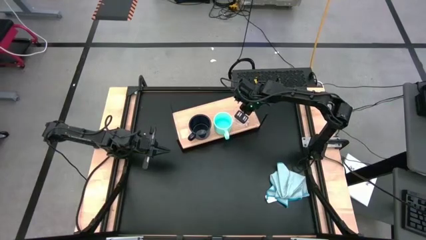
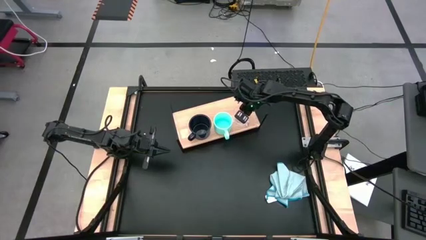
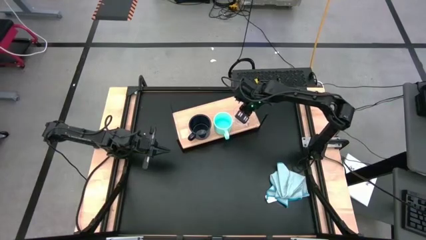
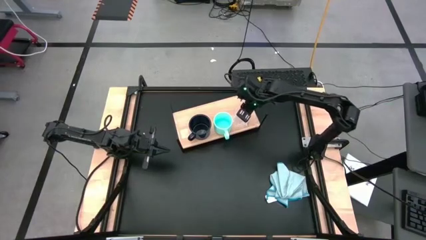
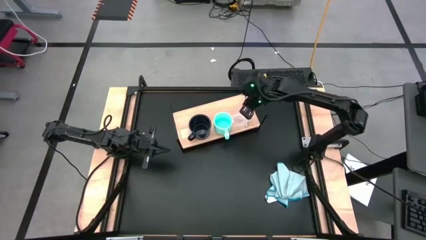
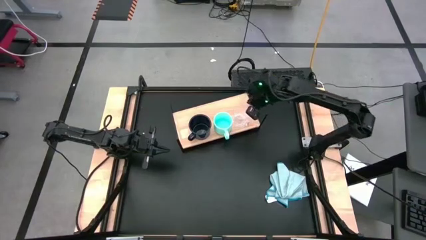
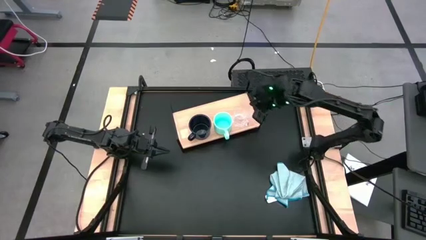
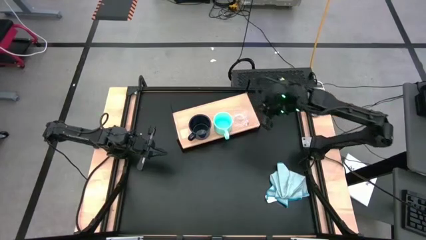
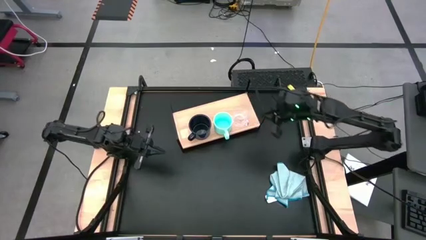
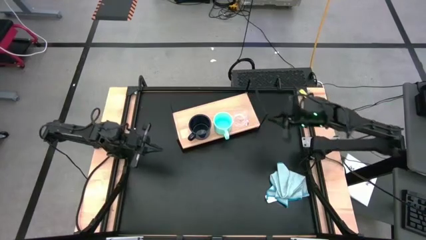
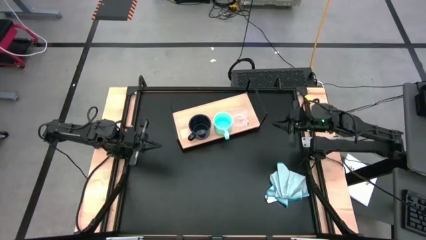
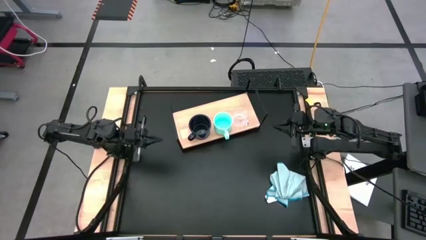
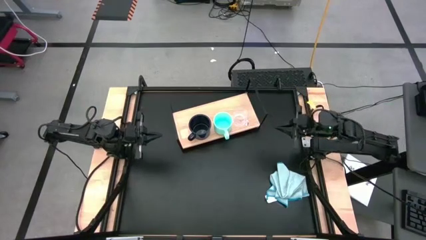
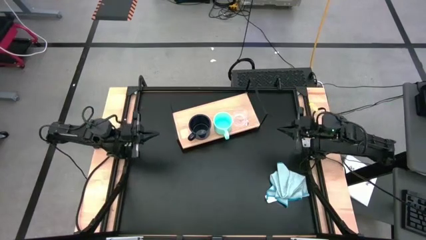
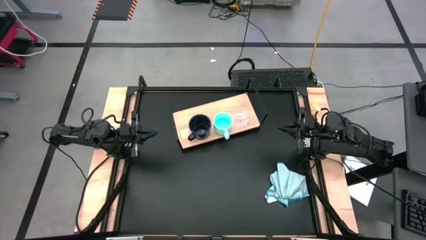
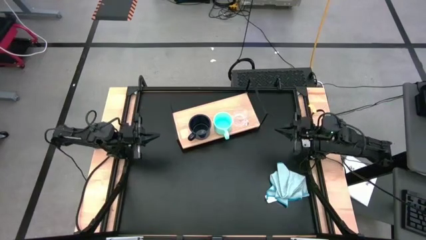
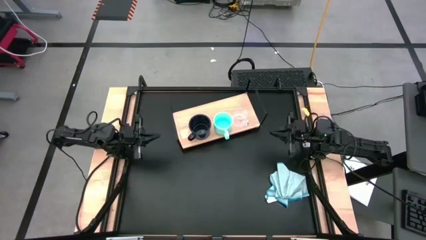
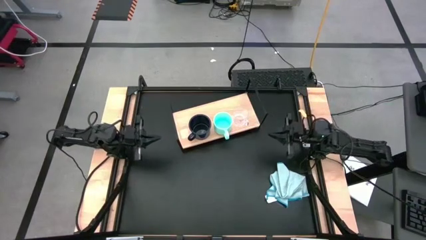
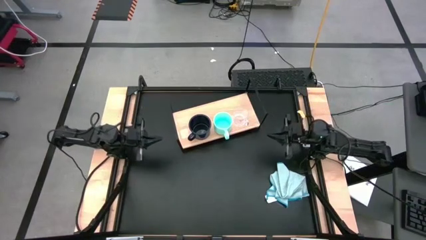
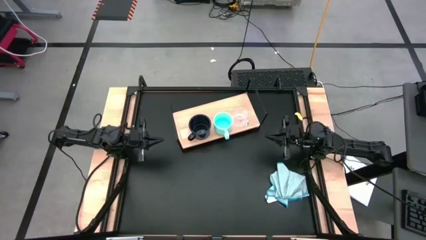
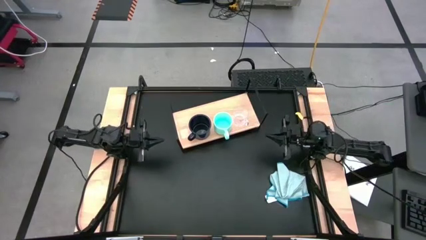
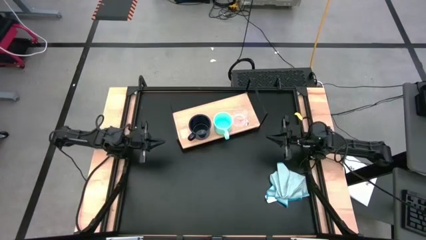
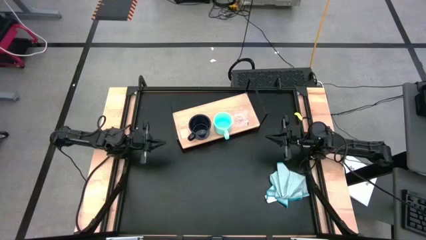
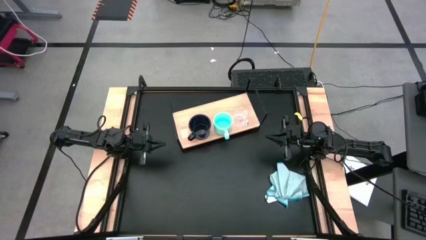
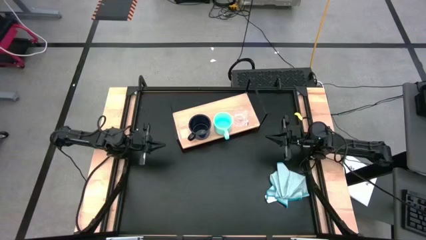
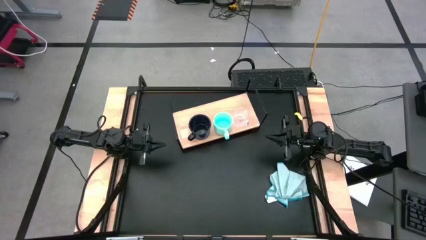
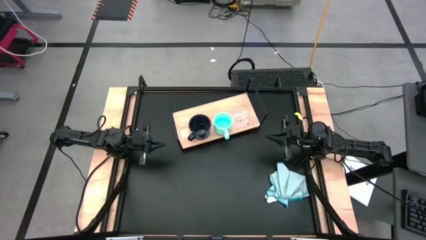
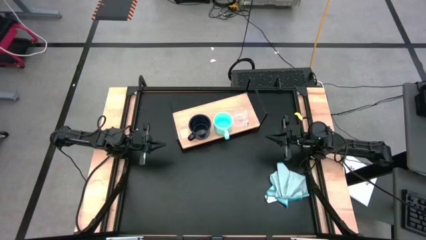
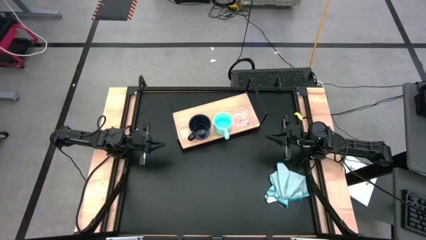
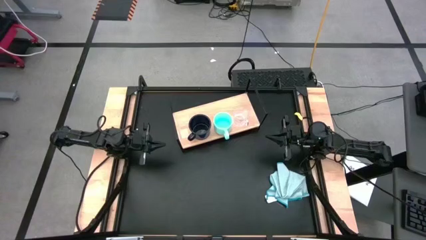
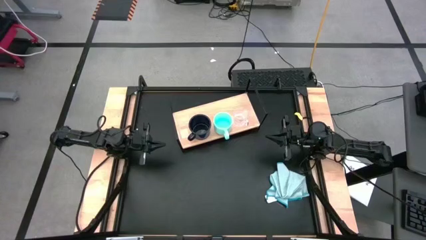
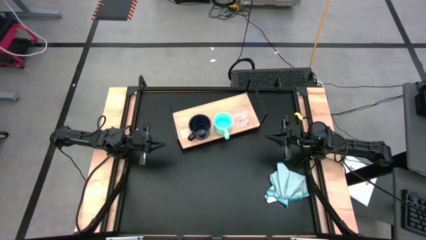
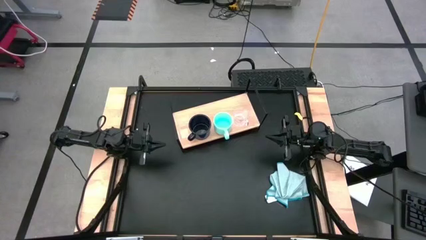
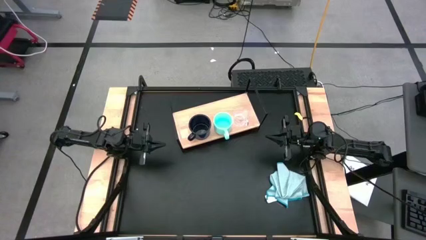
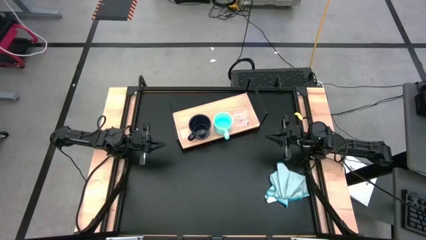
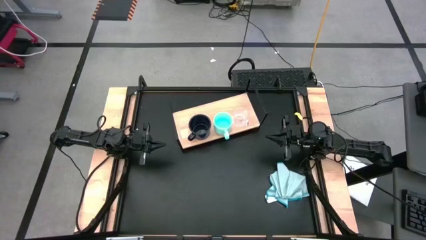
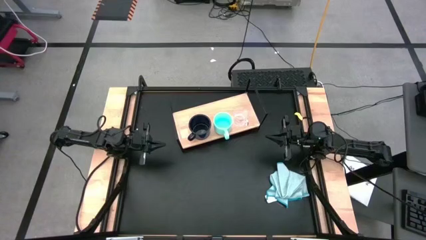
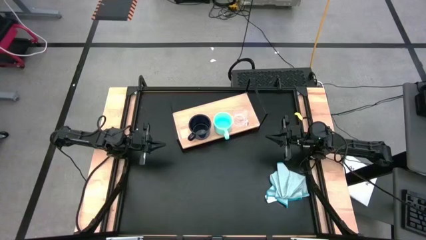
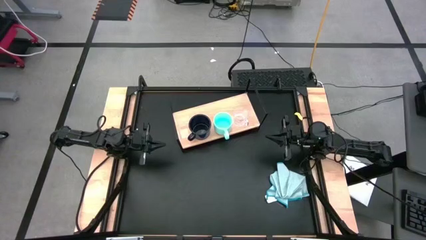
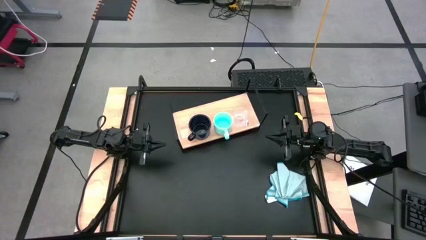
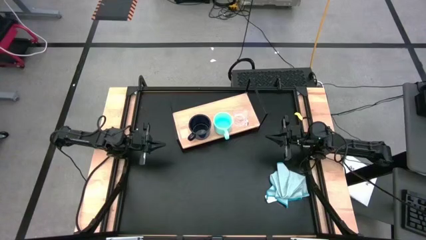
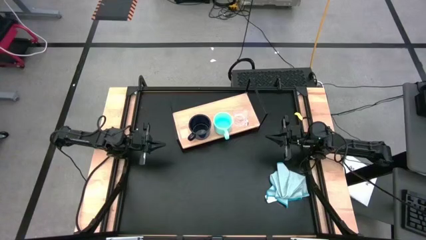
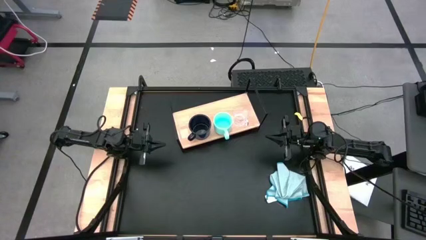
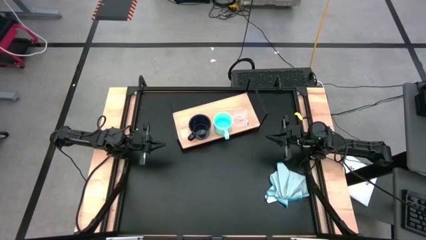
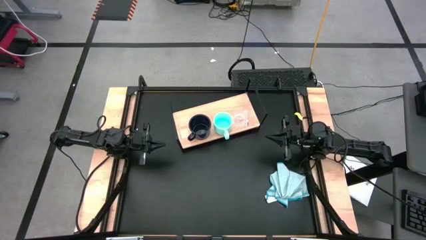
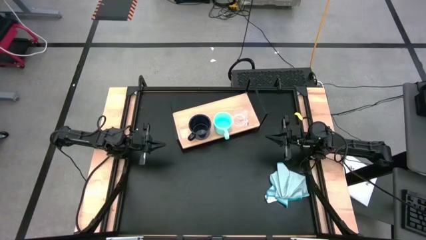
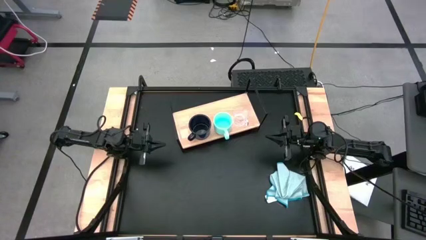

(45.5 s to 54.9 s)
Task: Stack small to large cups/mugs on shelf
Return to Home Position

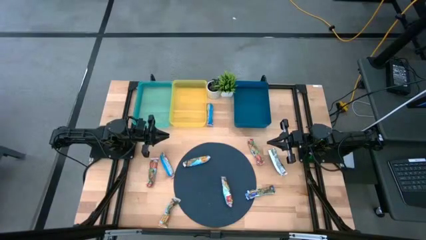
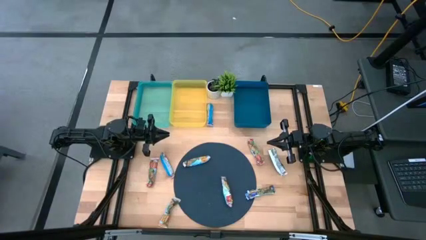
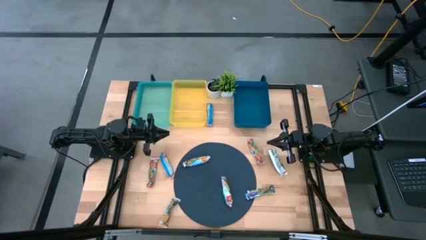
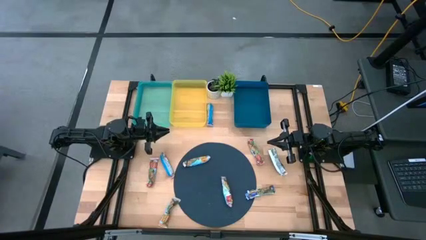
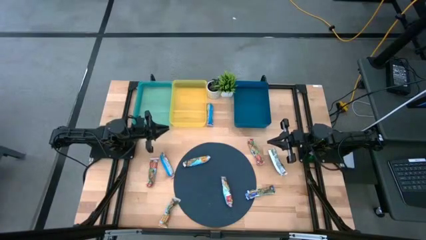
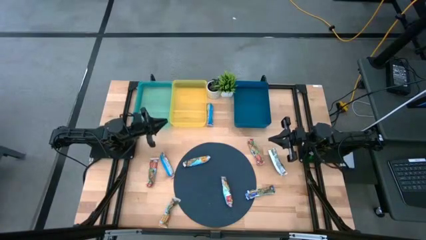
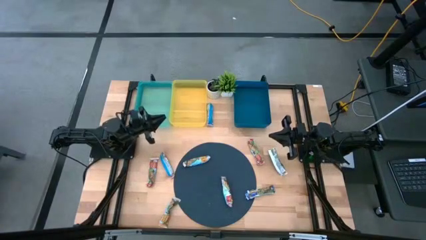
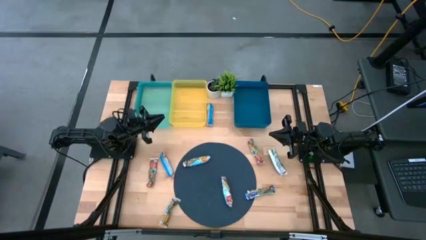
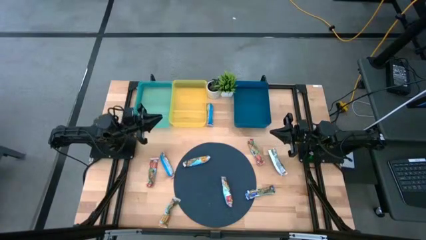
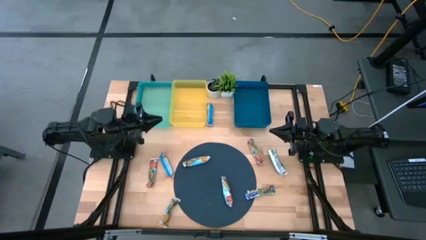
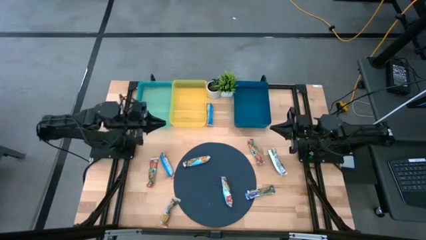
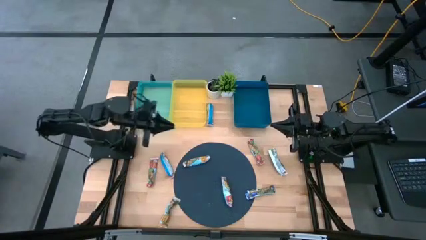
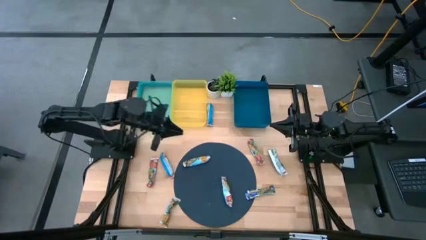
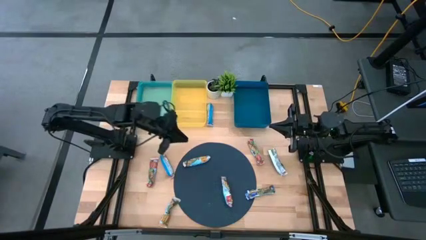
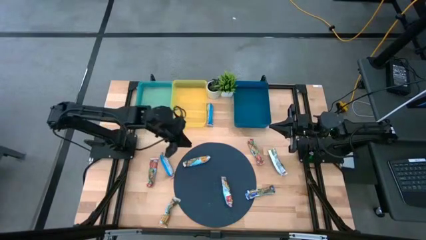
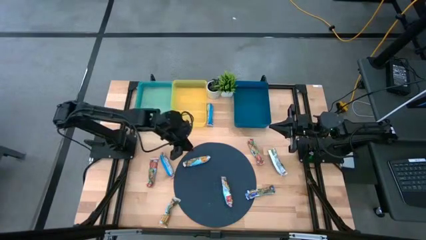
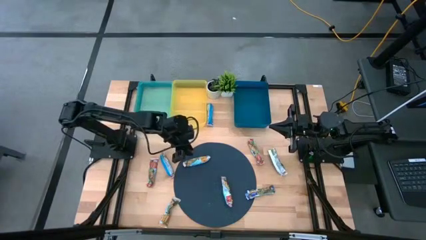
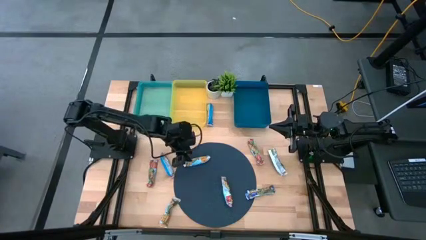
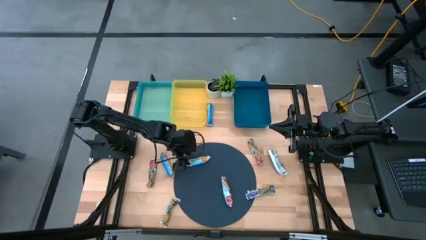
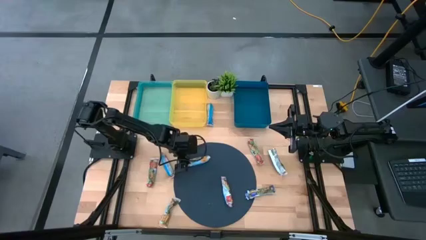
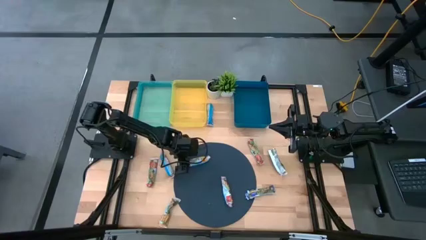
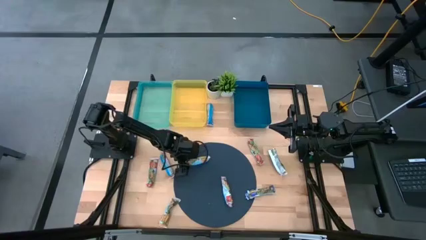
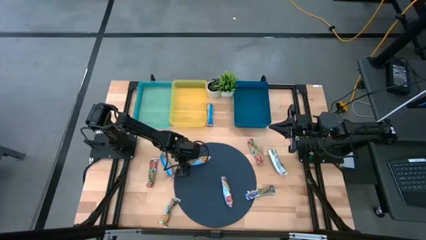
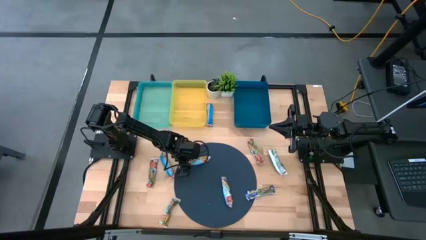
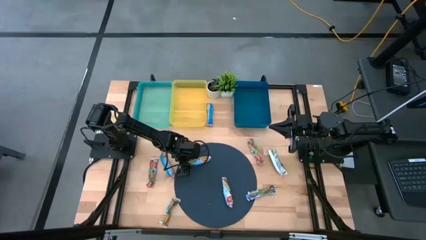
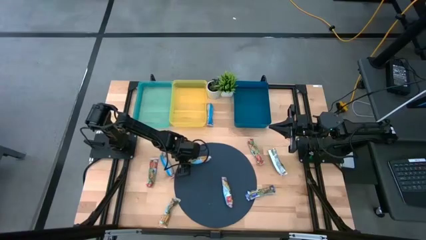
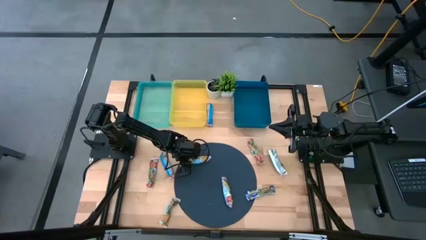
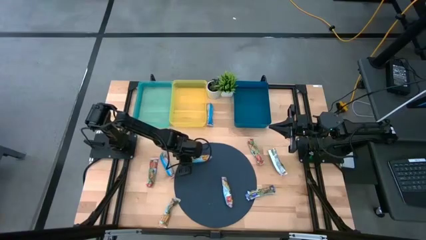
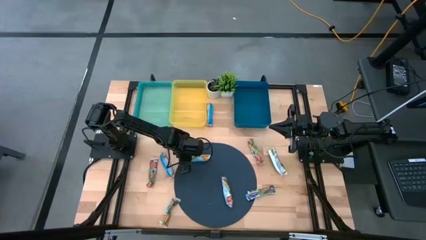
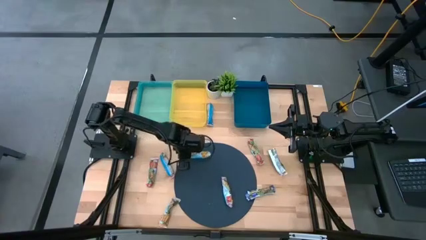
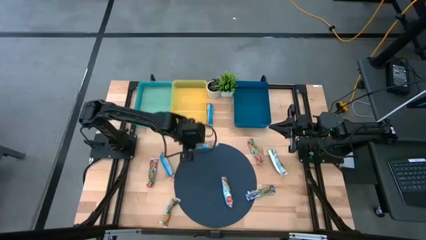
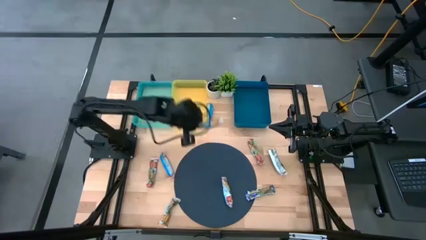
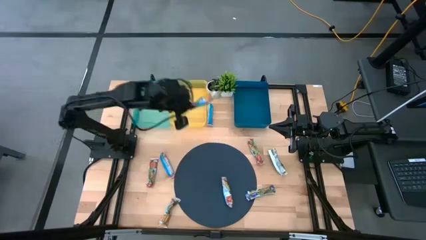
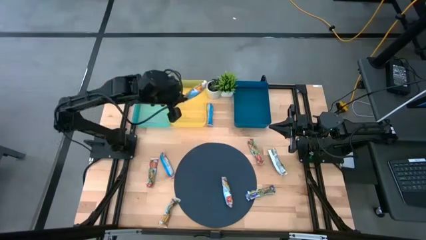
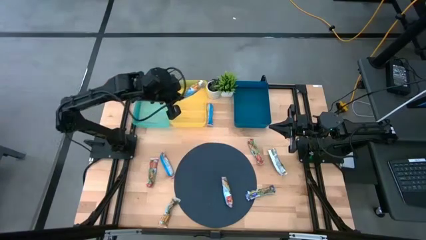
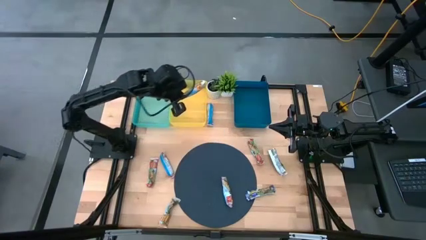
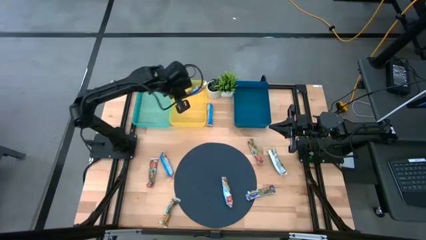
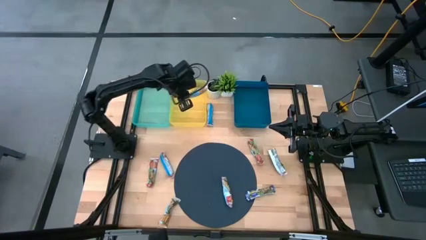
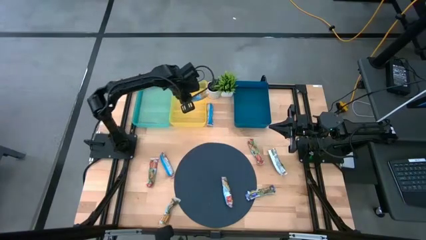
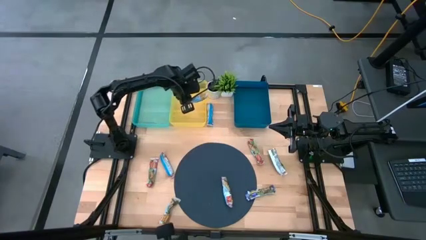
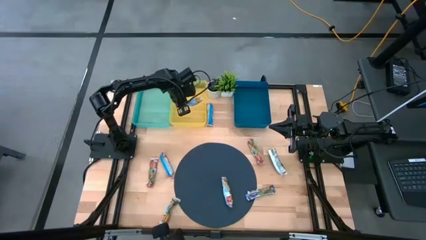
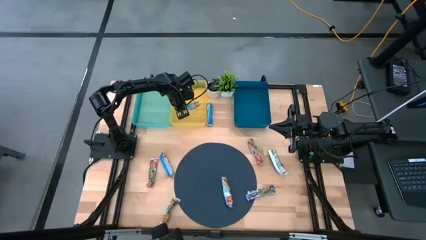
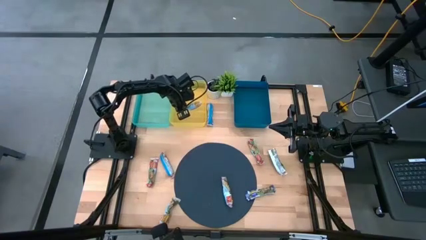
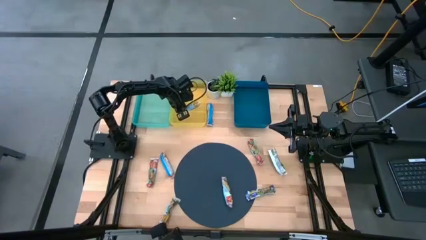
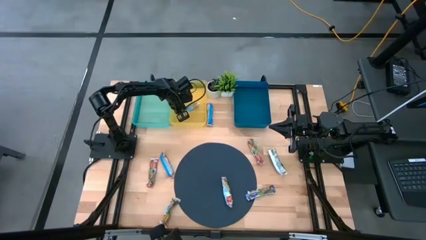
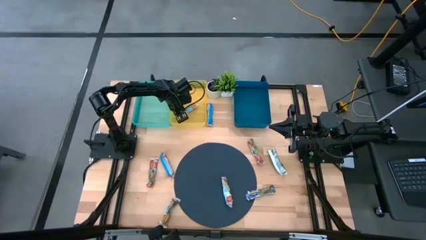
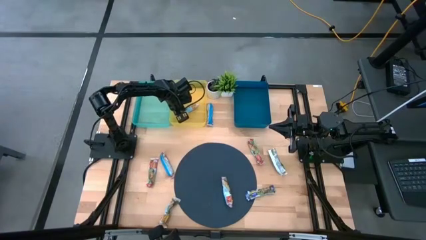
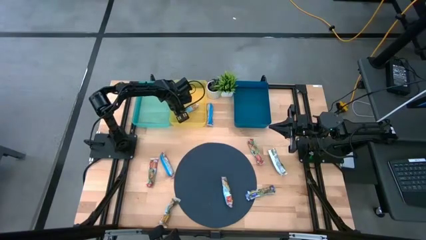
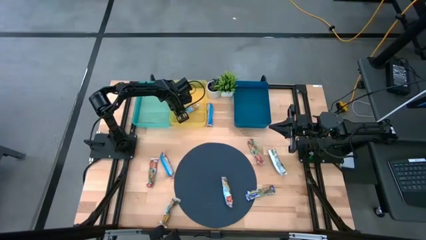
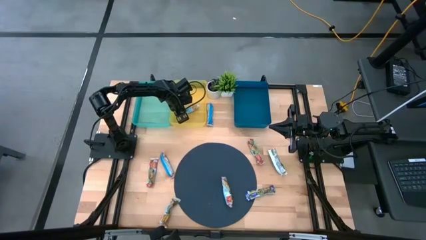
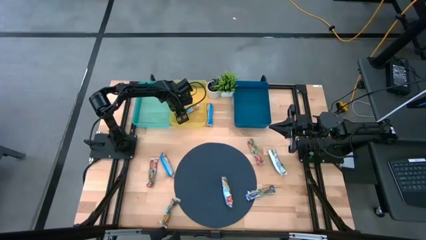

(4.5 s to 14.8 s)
Task: Pick and place Granola Bars by type
Put the green granola bar into the yellow bin
